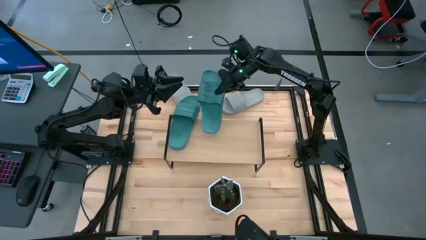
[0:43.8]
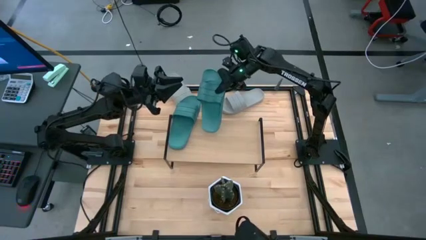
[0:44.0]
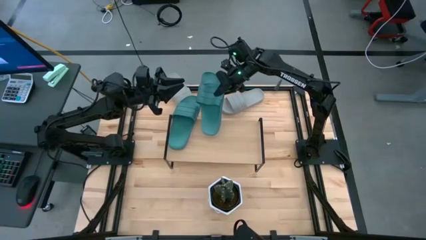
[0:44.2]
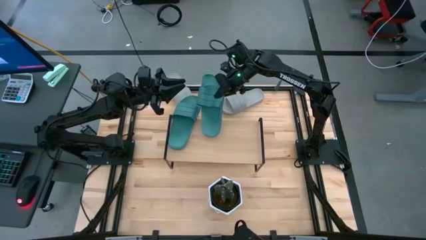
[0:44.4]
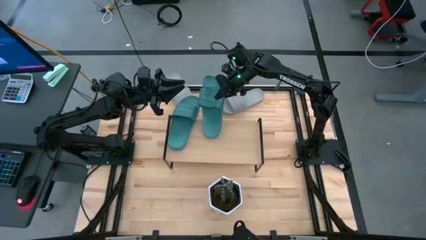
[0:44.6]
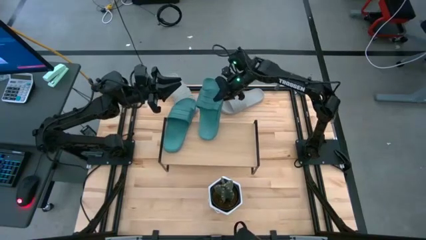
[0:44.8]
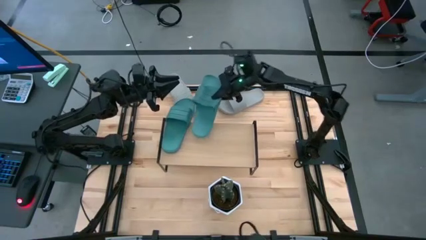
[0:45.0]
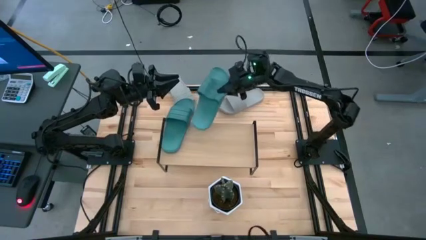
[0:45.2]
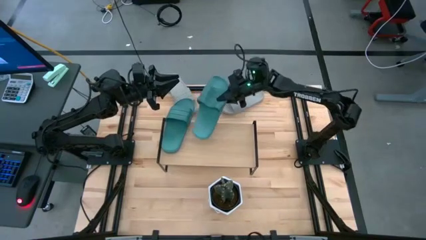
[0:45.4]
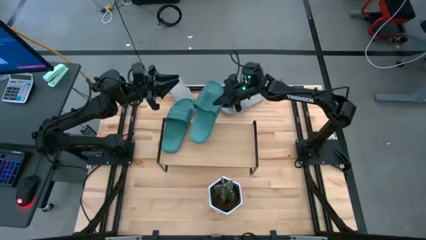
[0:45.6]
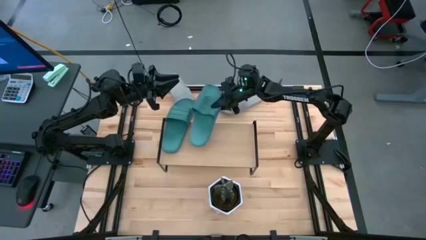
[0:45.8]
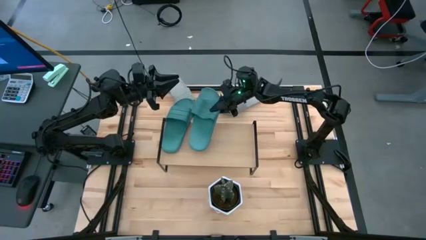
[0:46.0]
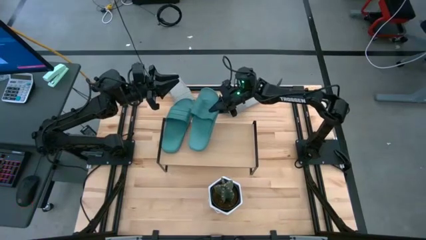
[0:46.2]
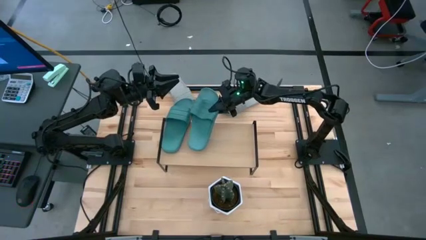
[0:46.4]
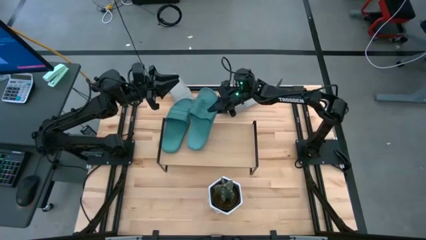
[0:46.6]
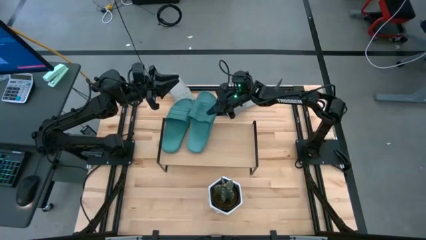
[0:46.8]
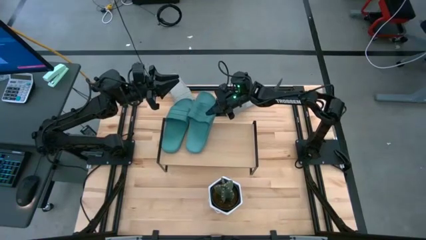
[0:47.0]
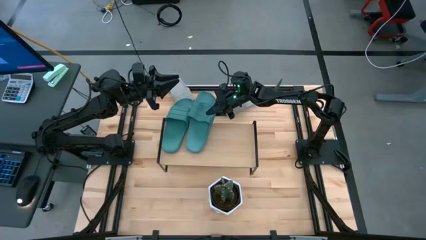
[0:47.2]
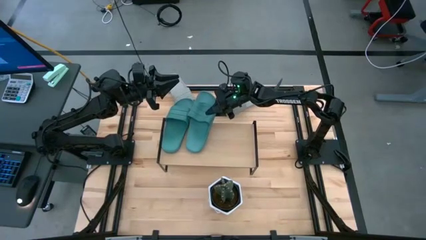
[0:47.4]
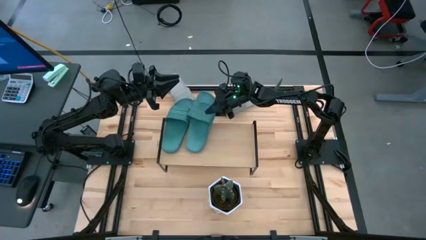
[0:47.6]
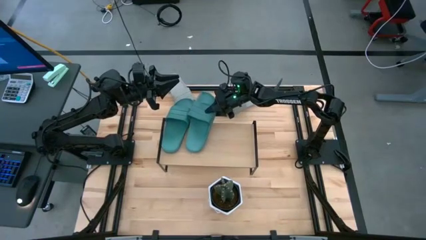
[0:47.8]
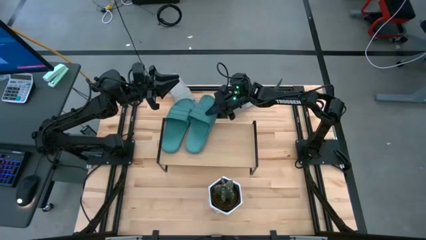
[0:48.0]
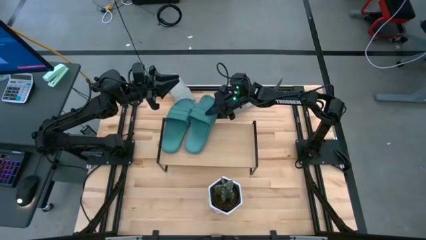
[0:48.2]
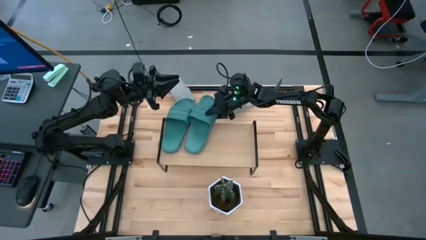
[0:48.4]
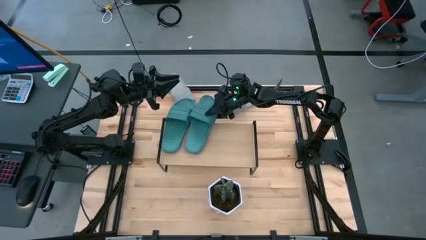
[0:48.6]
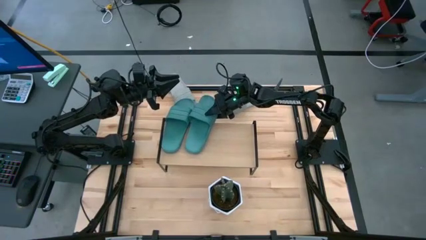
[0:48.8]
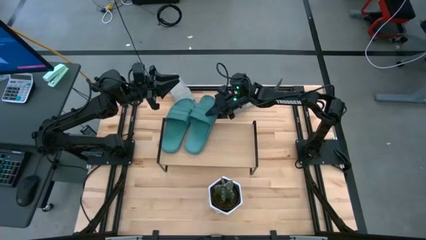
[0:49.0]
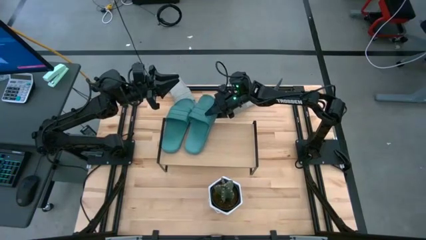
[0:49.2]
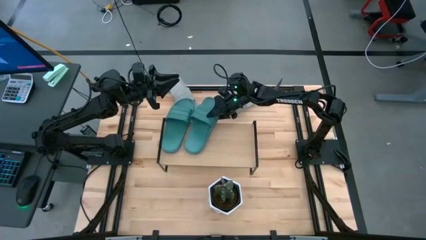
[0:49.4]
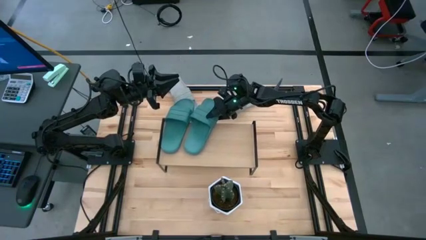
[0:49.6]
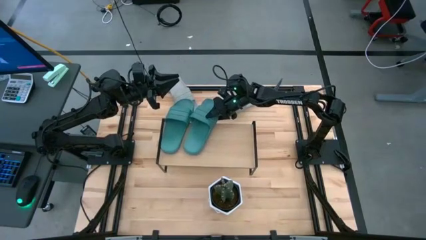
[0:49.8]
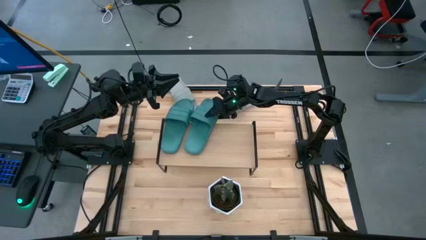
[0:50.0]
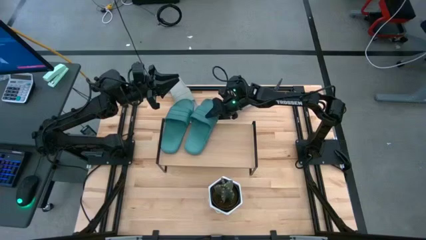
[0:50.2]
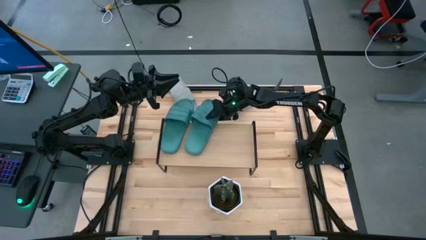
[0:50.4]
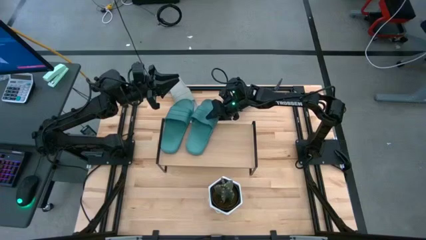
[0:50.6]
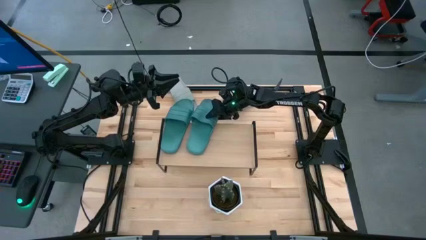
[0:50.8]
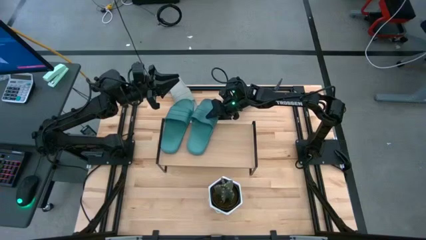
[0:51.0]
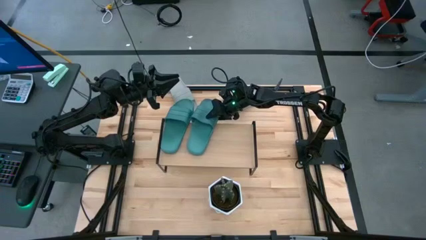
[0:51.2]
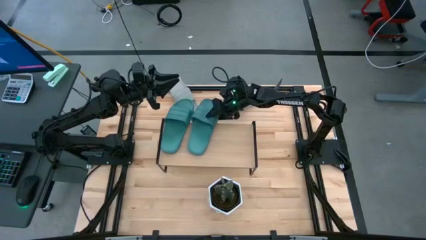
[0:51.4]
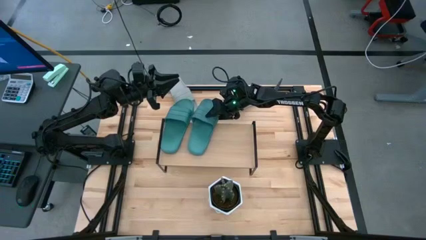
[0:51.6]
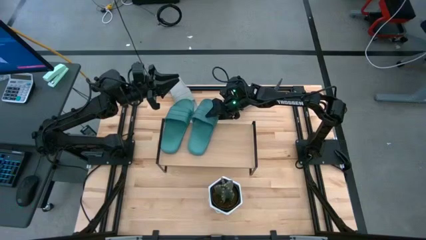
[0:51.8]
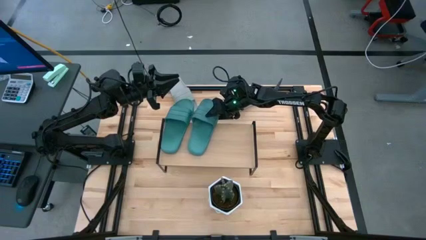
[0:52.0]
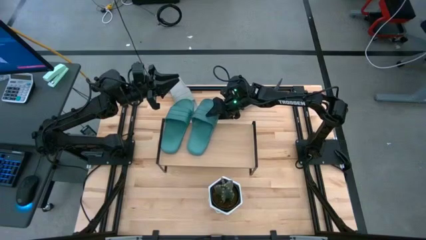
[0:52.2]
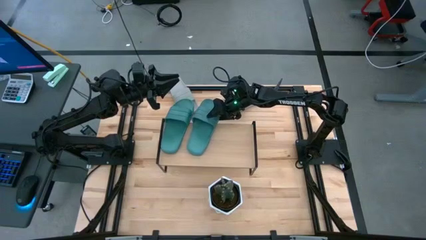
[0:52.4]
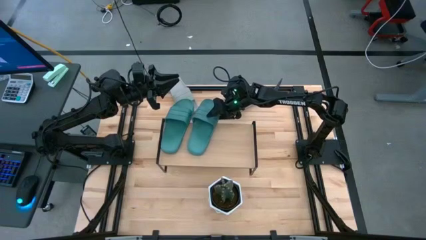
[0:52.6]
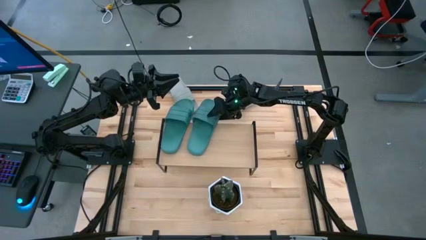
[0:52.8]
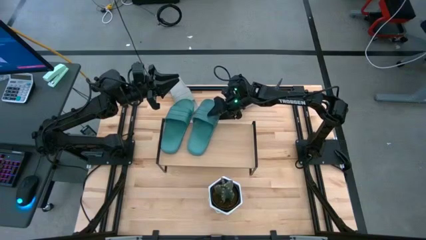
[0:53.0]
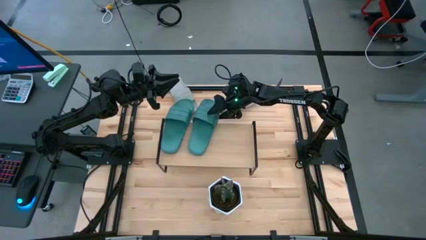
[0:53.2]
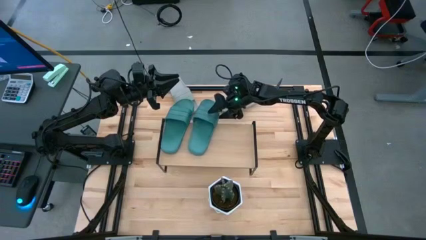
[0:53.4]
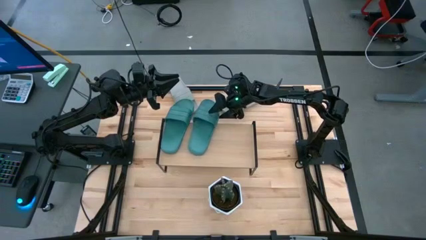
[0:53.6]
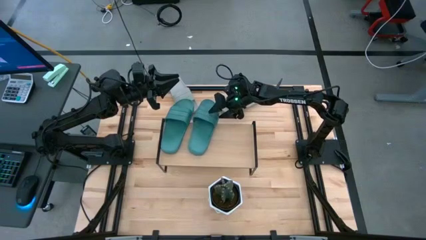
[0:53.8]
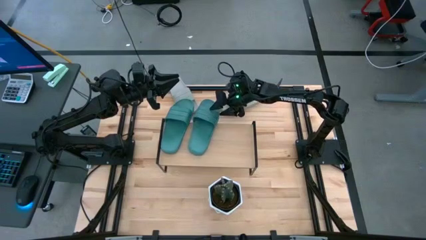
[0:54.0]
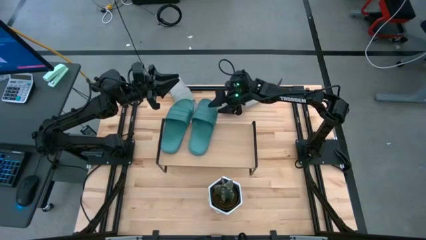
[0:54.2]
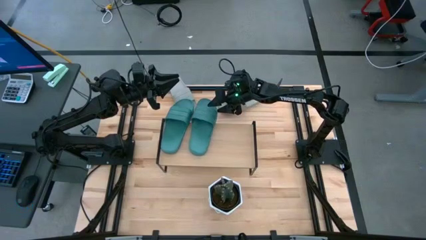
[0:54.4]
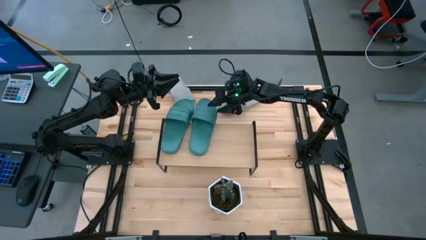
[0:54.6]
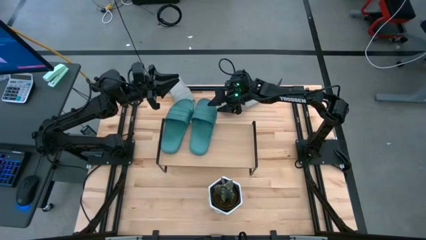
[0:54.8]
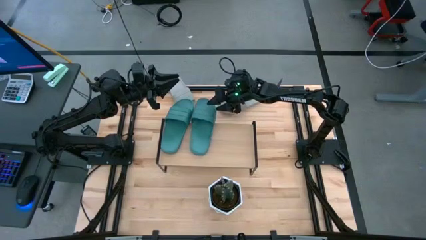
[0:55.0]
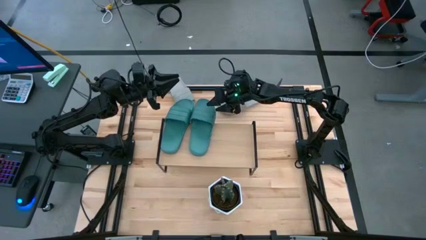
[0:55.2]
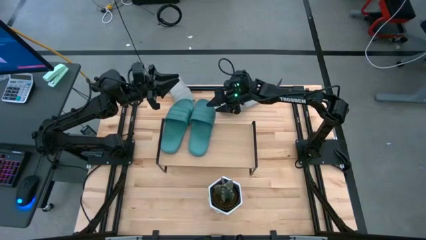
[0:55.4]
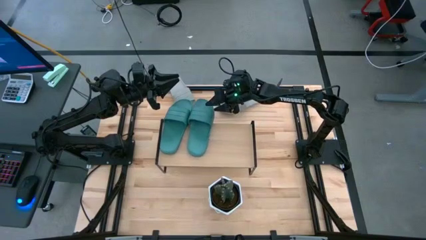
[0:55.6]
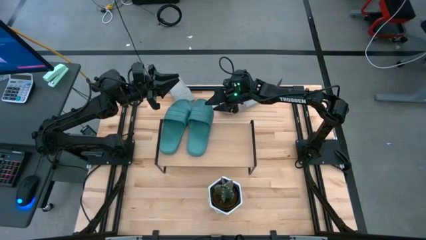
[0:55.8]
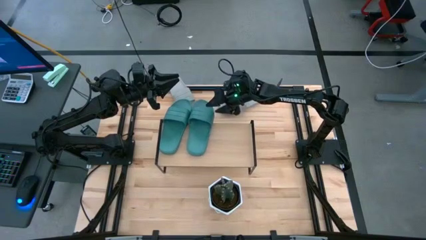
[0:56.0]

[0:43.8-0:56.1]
Task: Pick and place slides into the shelf
Put the green slipper on the shelf
